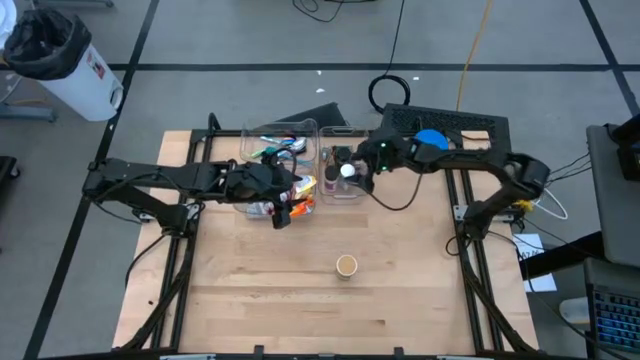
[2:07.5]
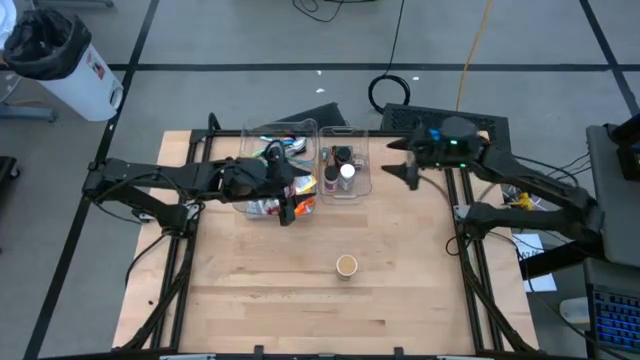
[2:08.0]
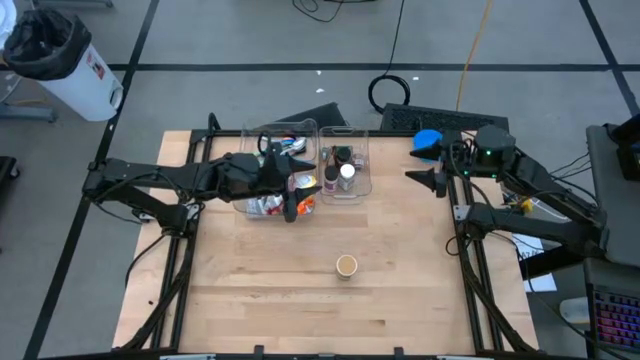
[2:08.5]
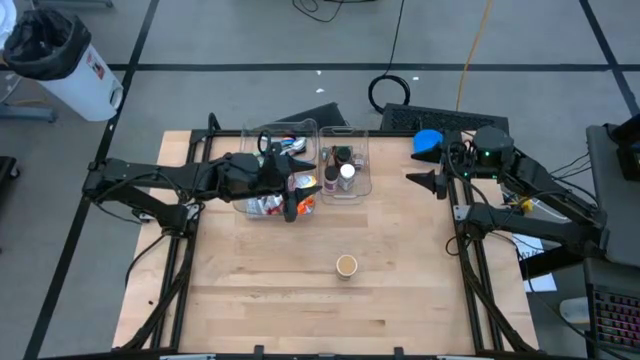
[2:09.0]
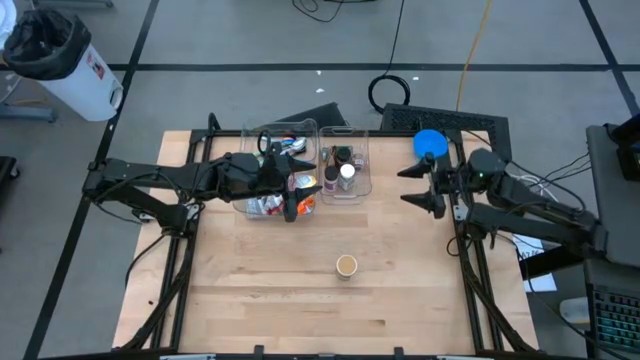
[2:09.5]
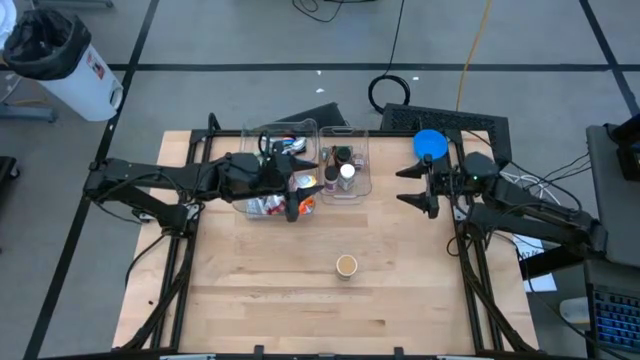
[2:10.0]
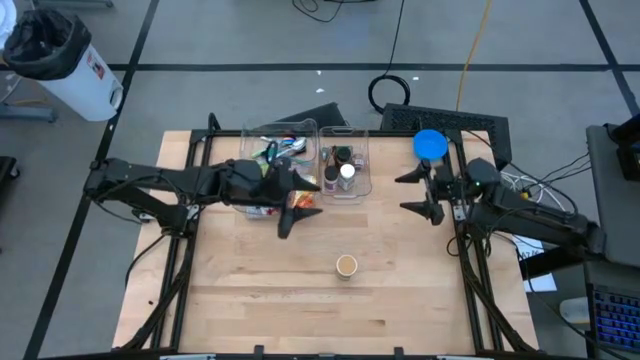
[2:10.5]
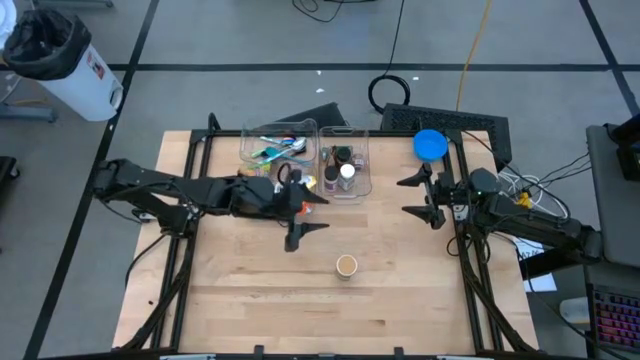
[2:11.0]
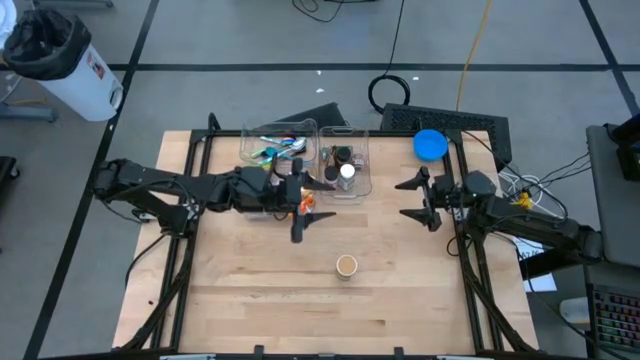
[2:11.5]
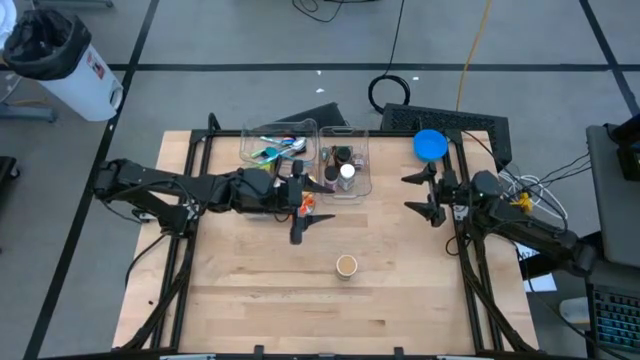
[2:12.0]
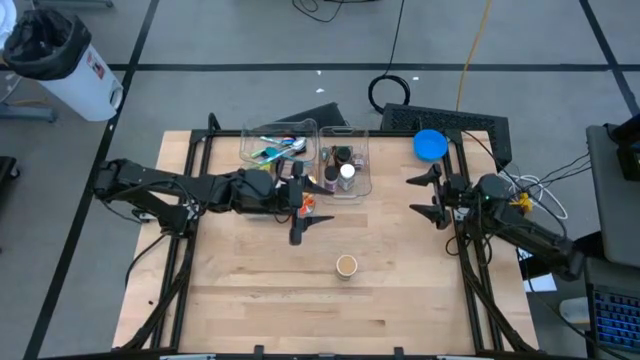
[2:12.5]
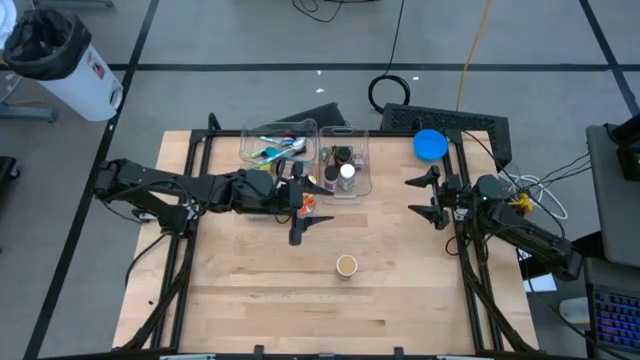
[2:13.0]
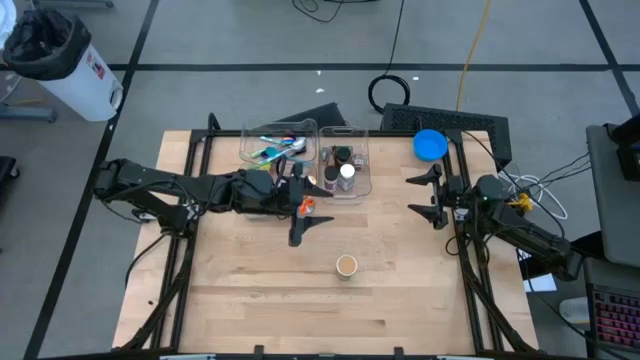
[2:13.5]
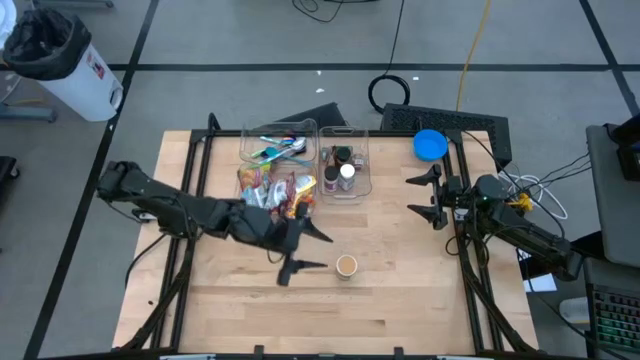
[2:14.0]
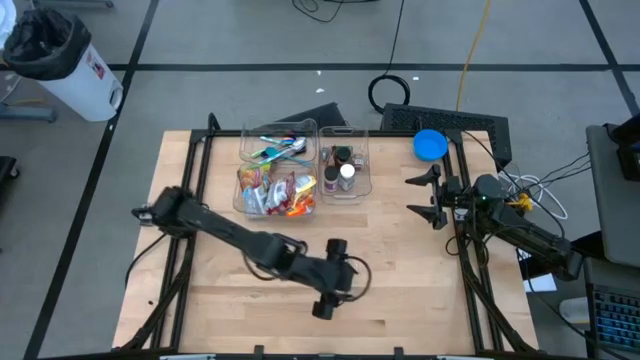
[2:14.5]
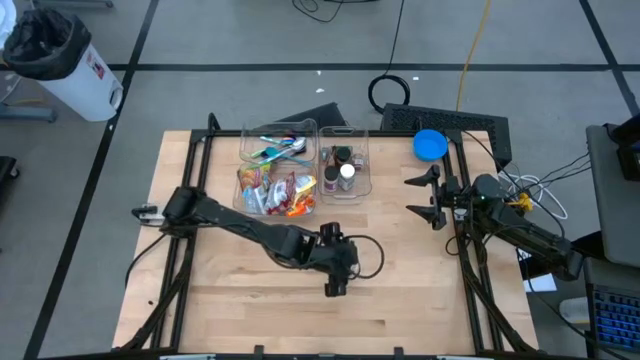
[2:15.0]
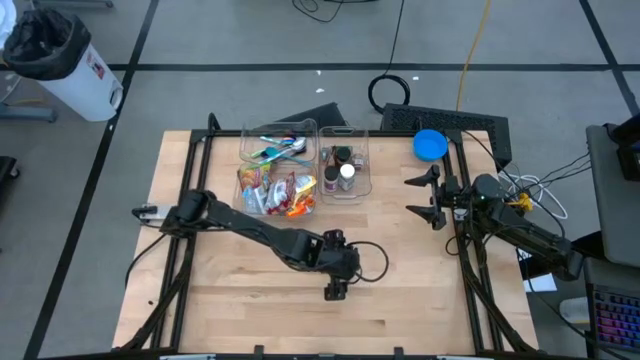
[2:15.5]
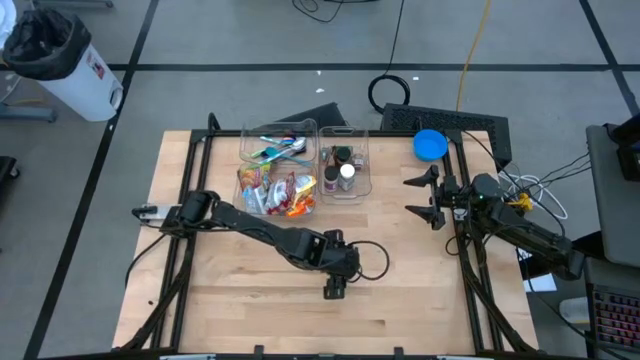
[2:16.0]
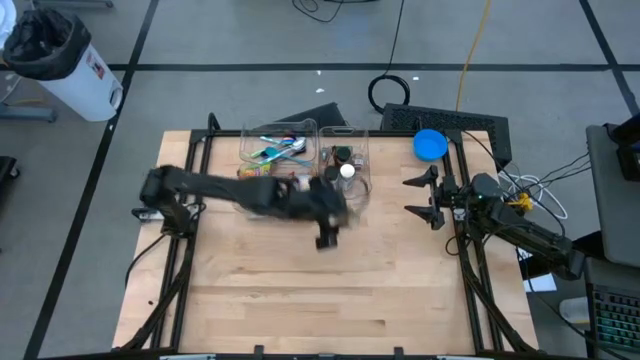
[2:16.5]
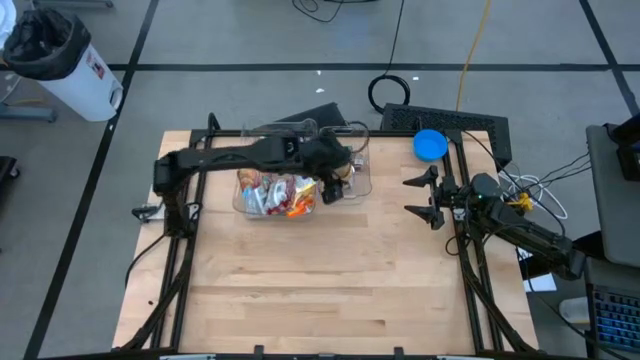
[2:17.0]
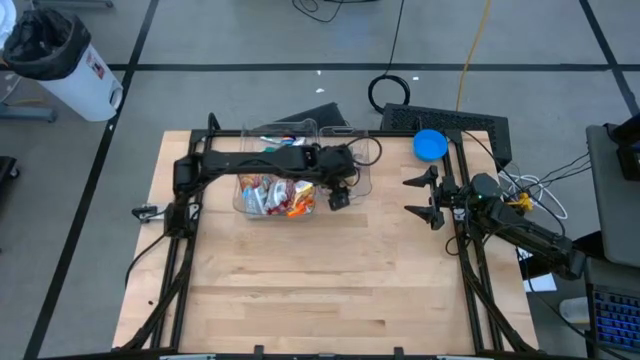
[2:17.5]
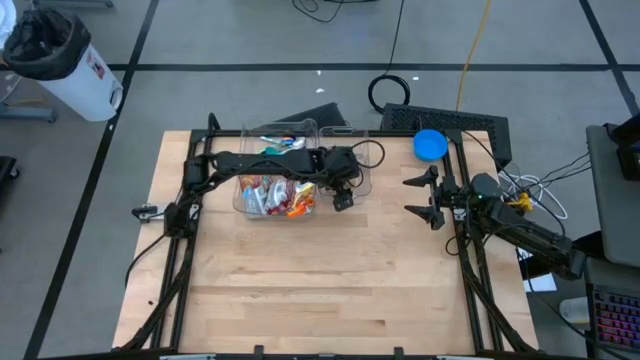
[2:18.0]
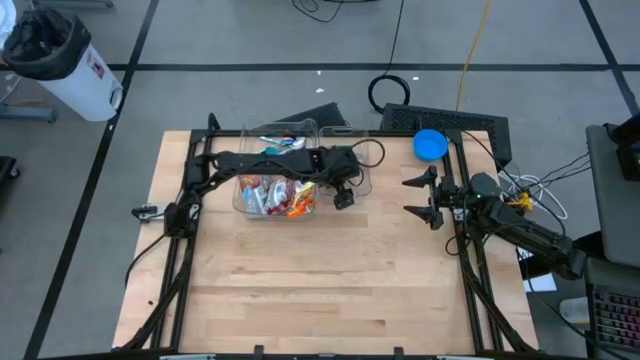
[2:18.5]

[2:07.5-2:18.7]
Task: Pick & Place Food Item
Put the gold seasoning bottle into the right transparent bin

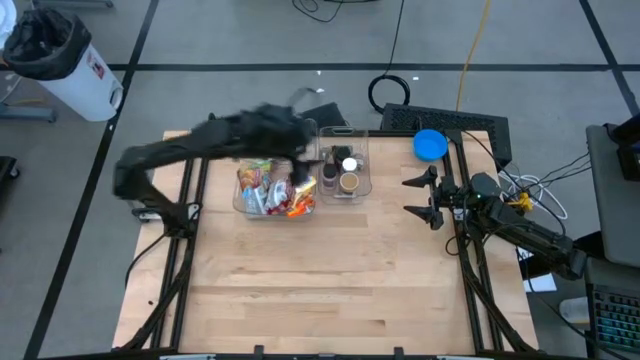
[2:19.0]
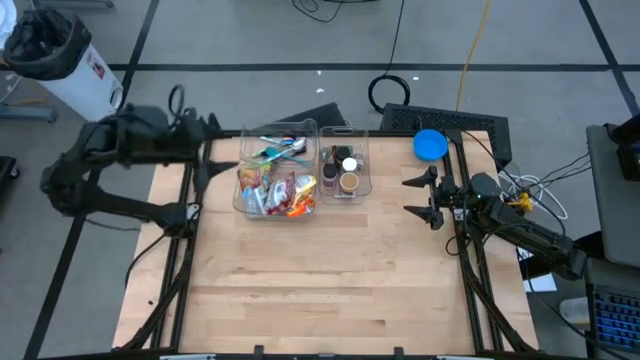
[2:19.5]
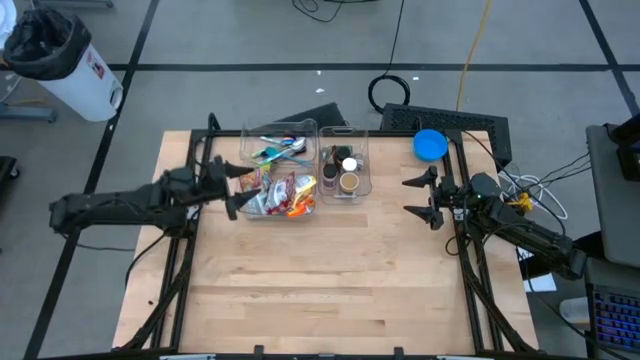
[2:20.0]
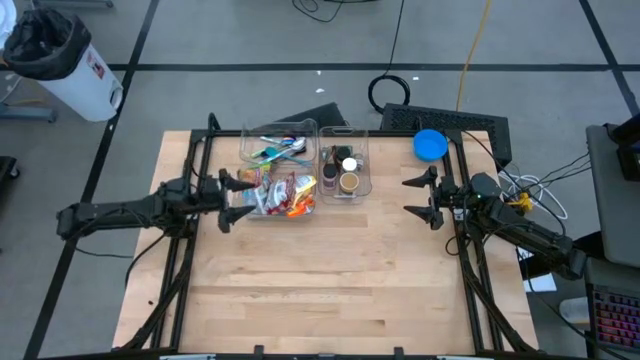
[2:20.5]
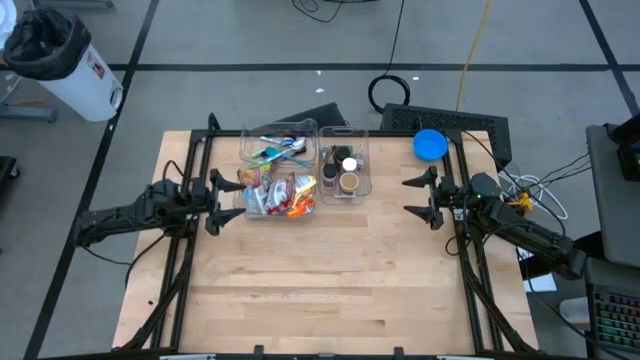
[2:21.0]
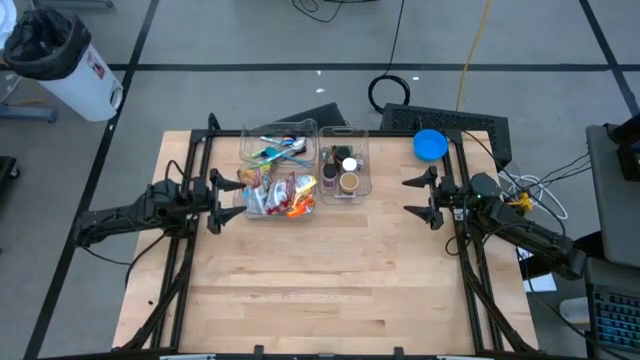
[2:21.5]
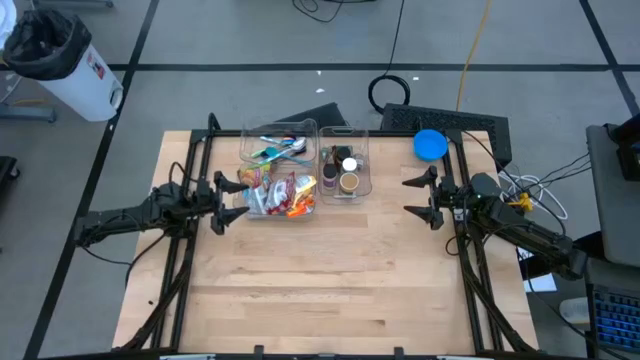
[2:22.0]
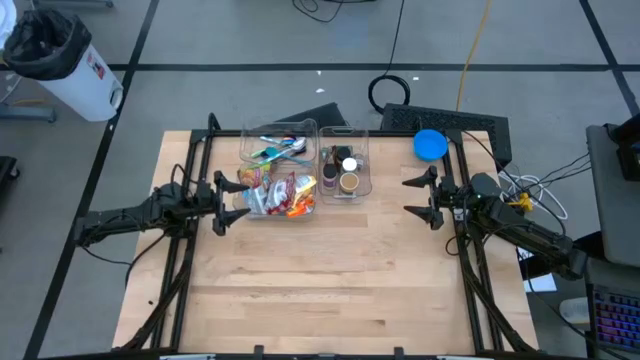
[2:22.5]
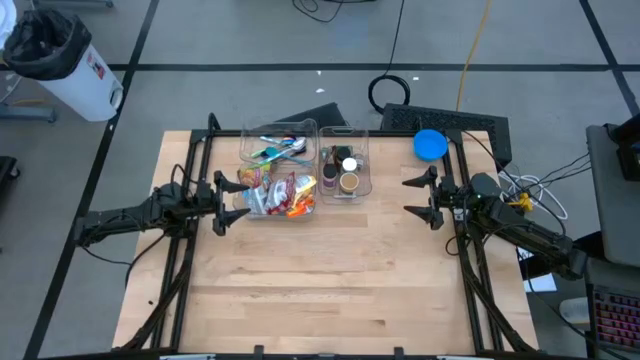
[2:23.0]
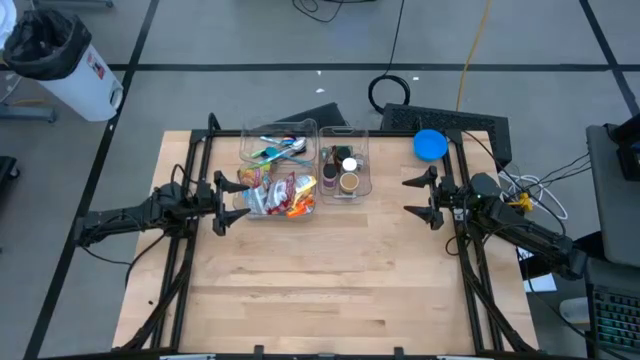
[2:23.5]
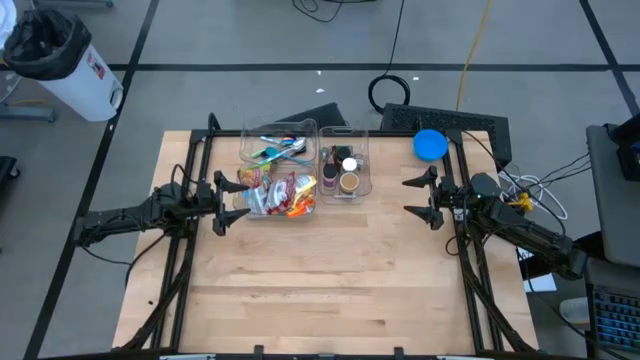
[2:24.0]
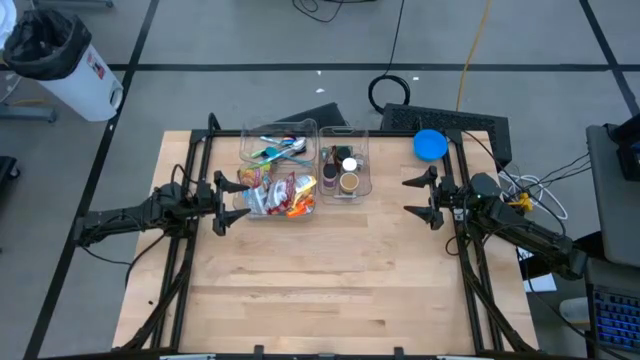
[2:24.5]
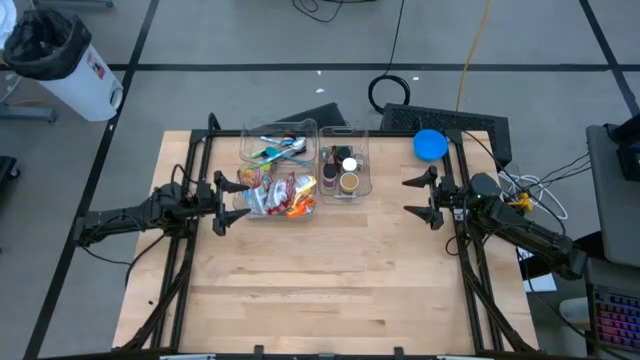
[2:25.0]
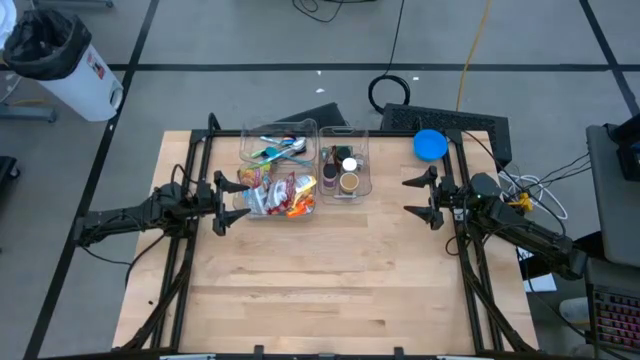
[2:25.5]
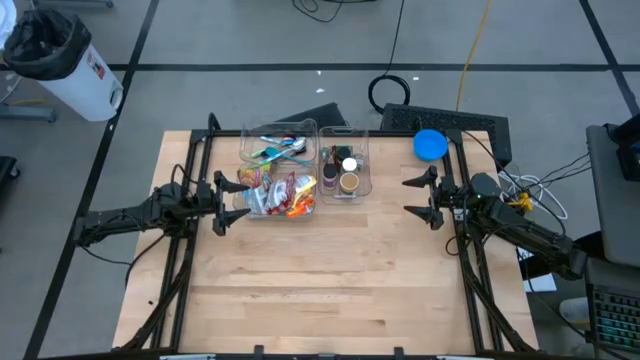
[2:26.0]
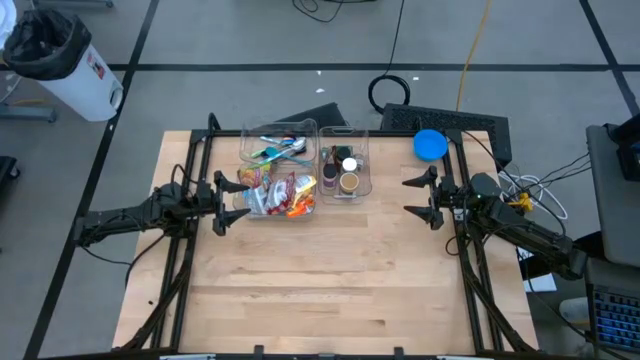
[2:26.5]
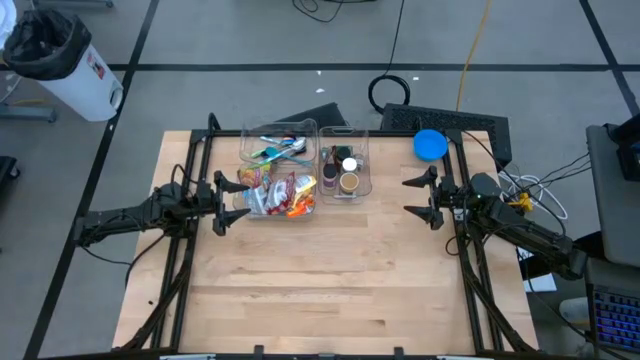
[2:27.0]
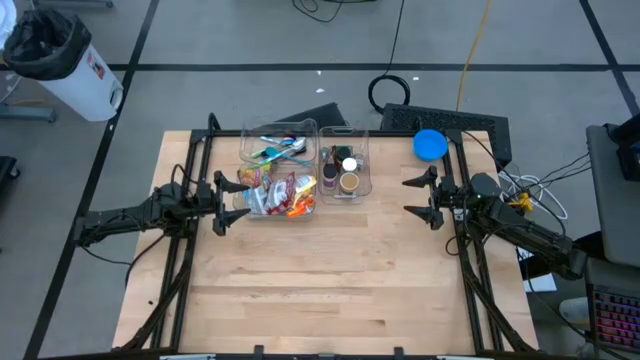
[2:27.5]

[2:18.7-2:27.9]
Return to Home Position

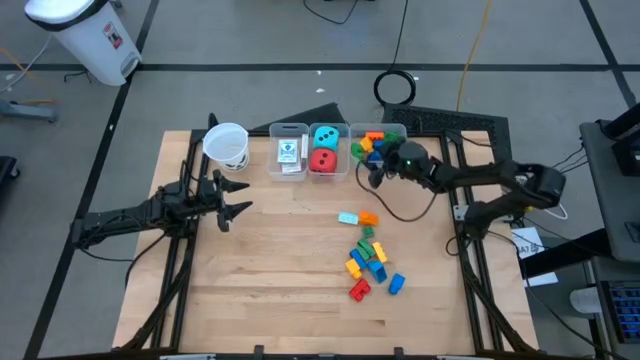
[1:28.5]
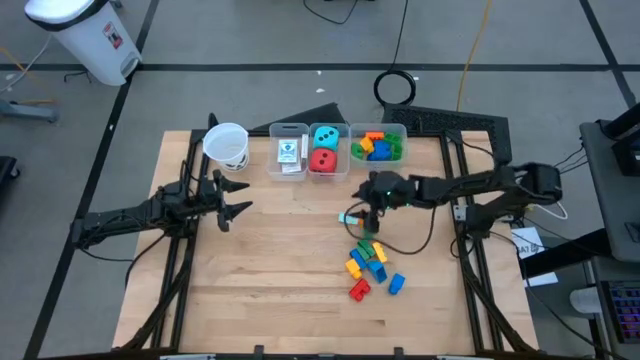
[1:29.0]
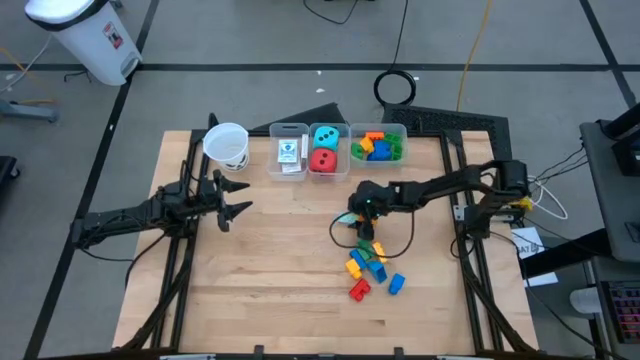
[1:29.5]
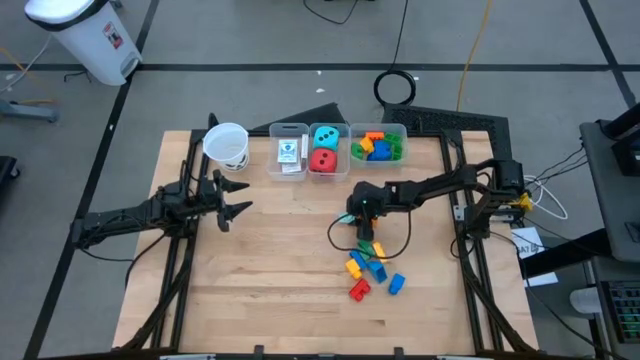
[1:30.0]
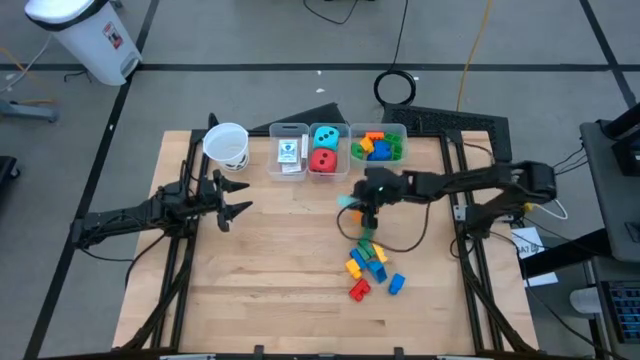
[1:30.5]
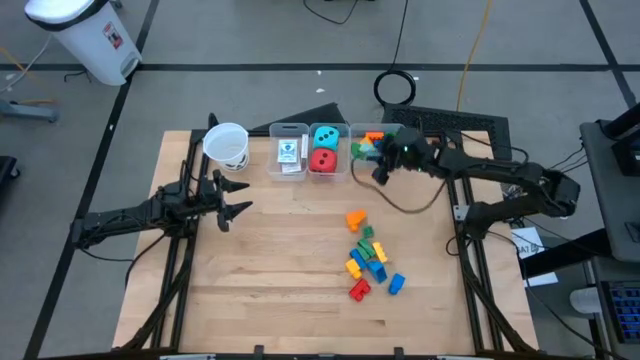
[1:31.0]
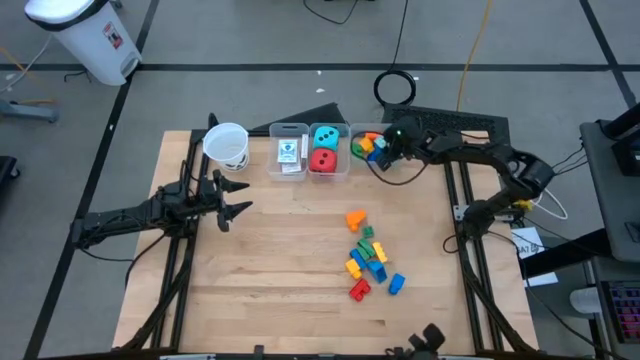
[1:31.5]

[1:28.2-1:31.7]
Task: Pick & Place Toys
Put the light blue game piece into the right transparent bin
